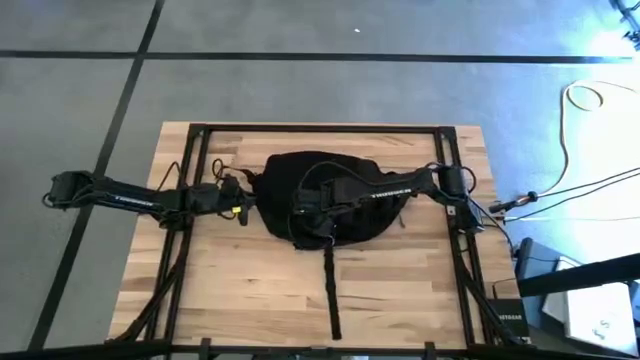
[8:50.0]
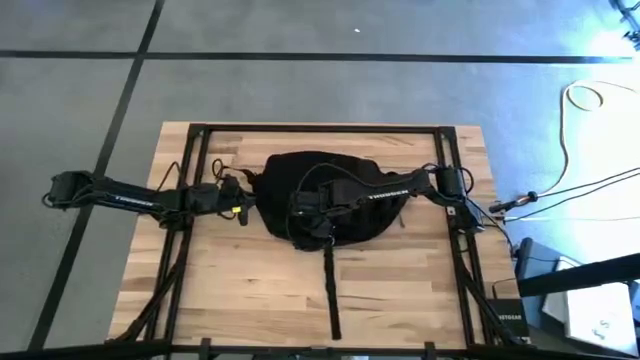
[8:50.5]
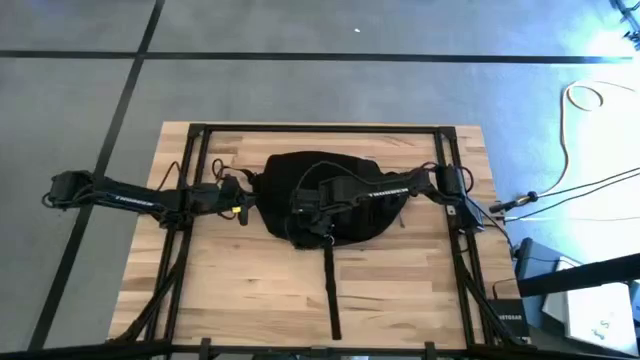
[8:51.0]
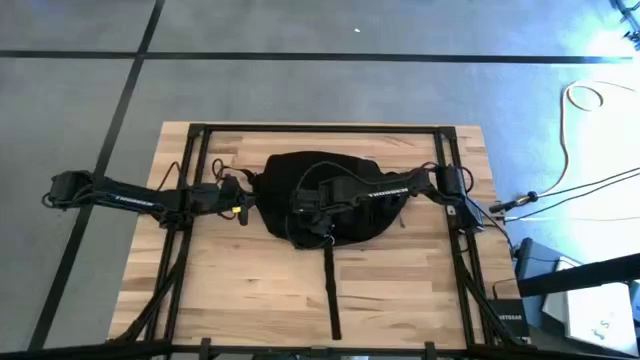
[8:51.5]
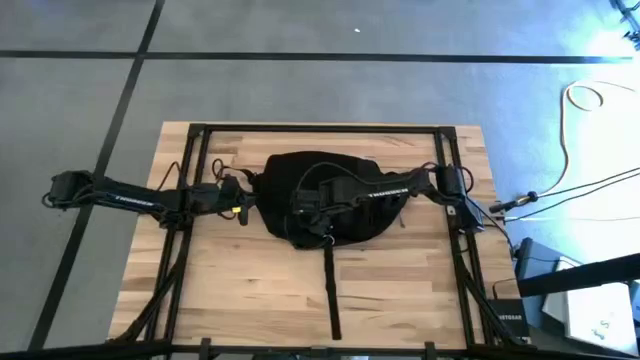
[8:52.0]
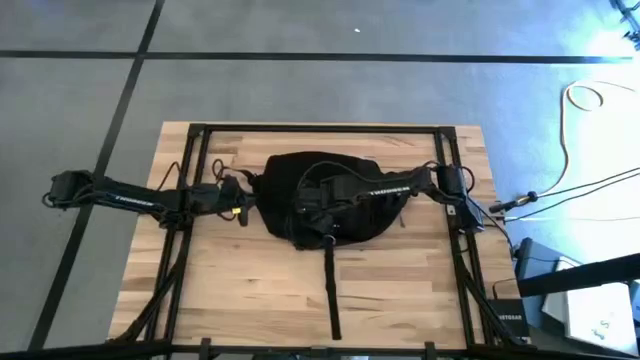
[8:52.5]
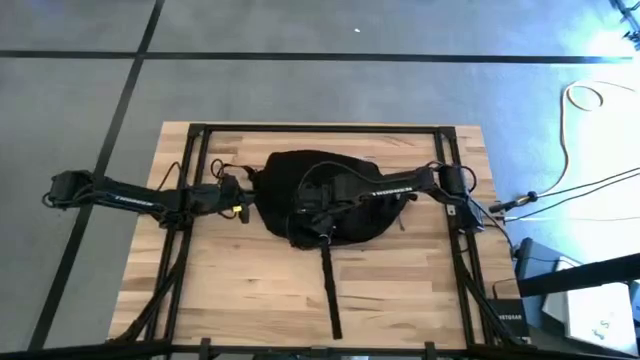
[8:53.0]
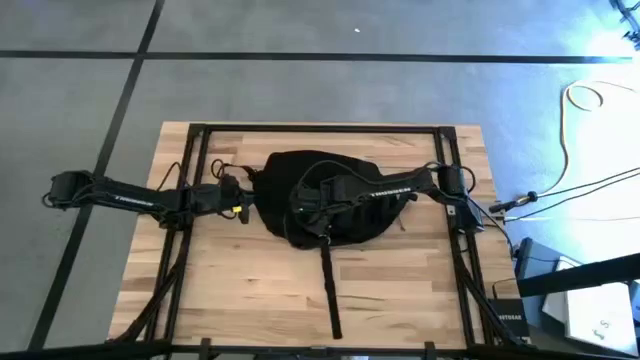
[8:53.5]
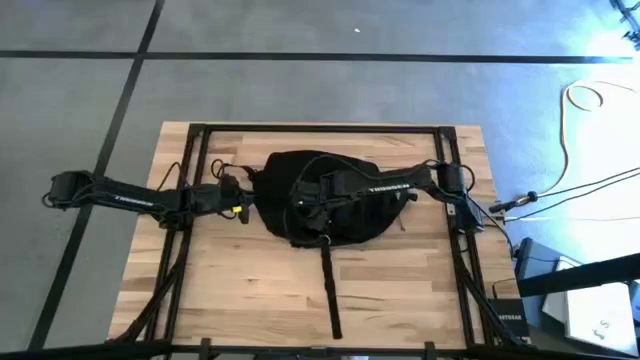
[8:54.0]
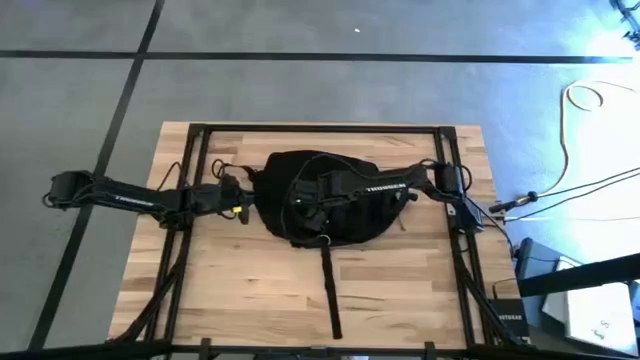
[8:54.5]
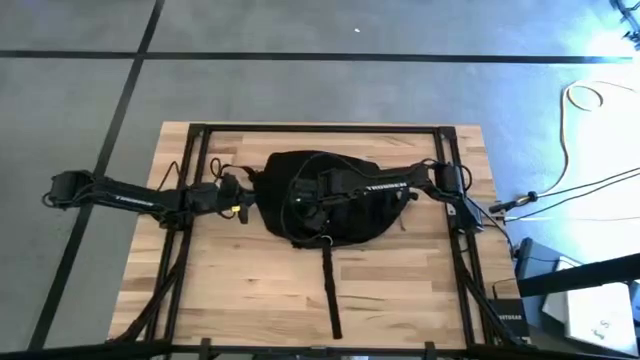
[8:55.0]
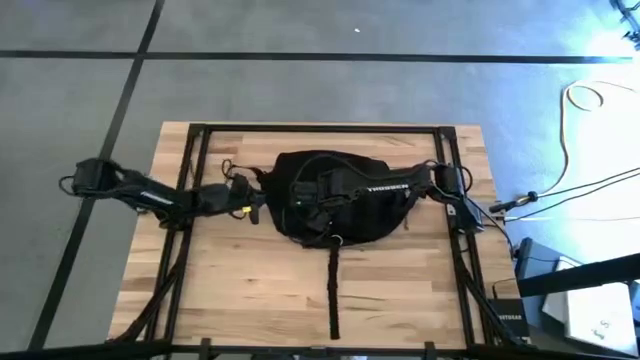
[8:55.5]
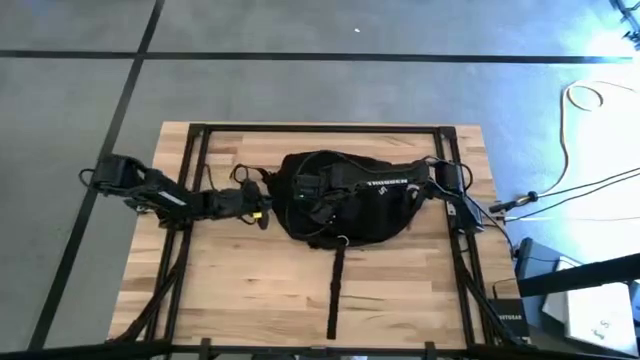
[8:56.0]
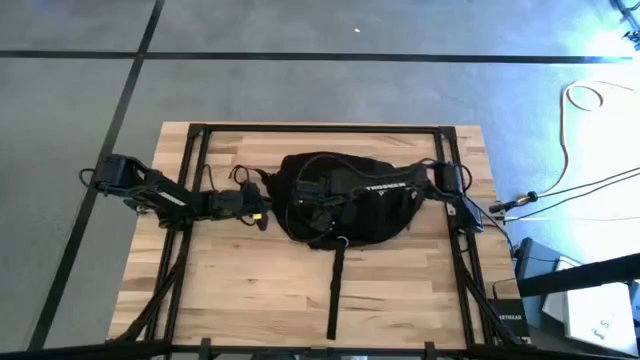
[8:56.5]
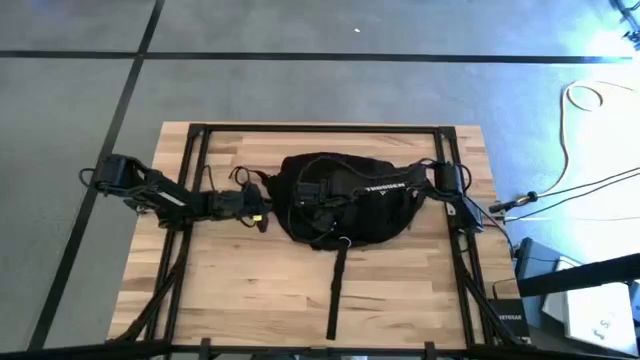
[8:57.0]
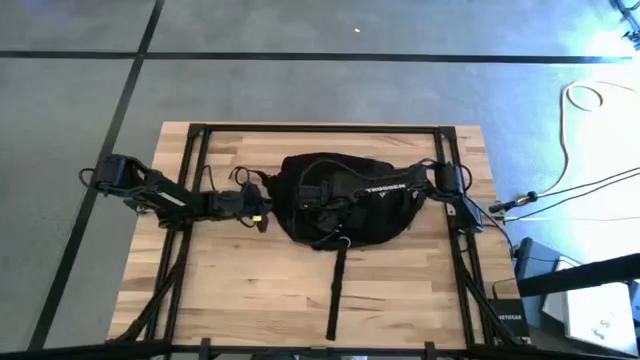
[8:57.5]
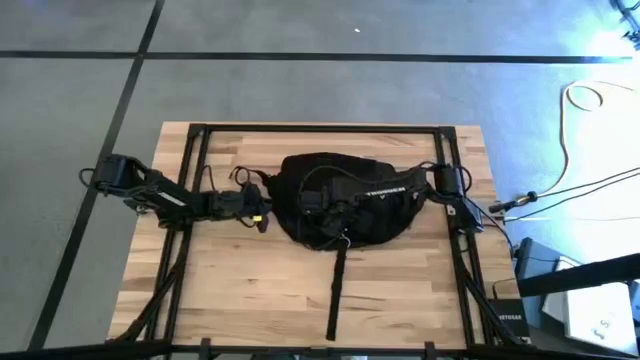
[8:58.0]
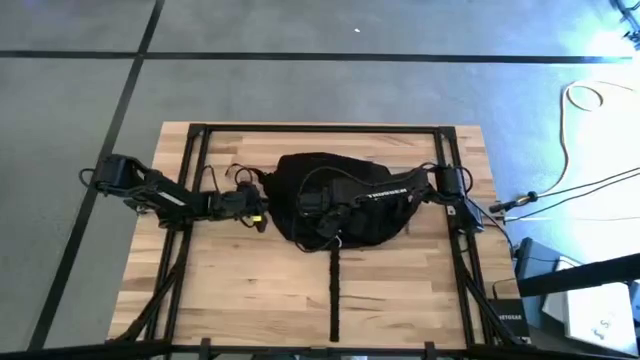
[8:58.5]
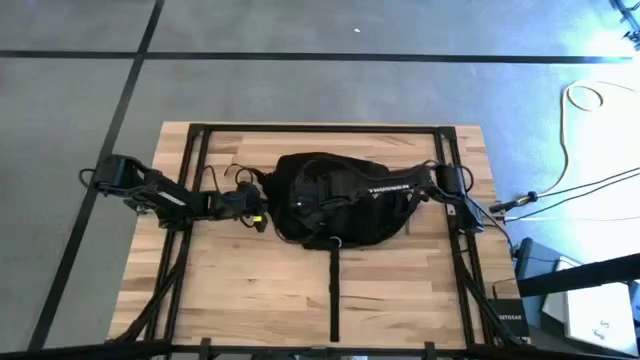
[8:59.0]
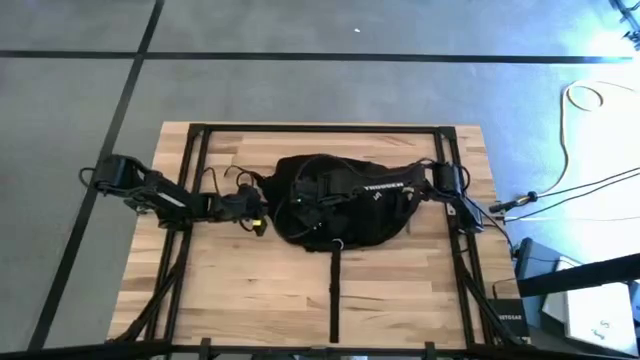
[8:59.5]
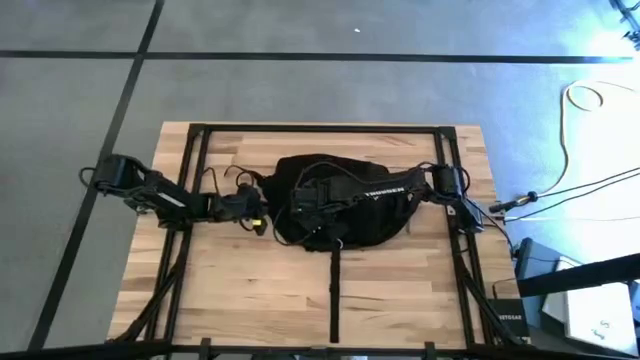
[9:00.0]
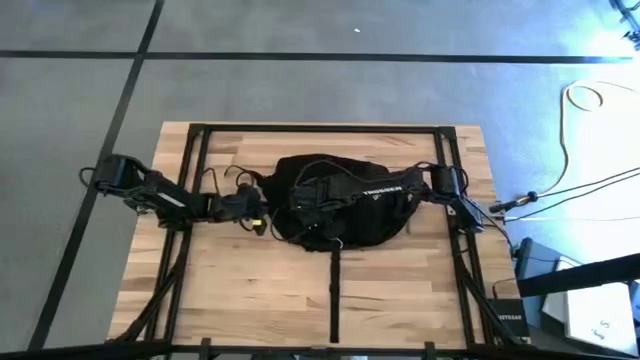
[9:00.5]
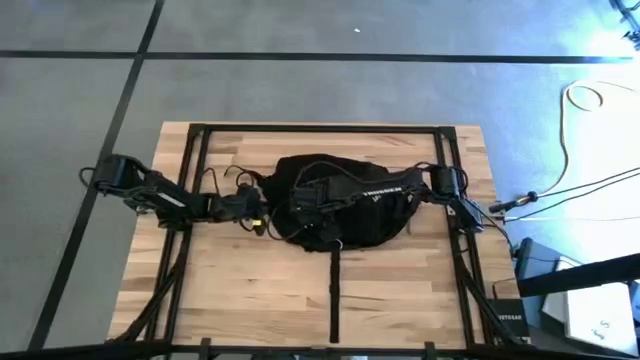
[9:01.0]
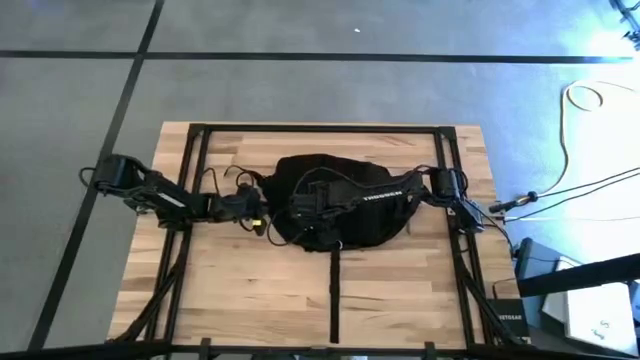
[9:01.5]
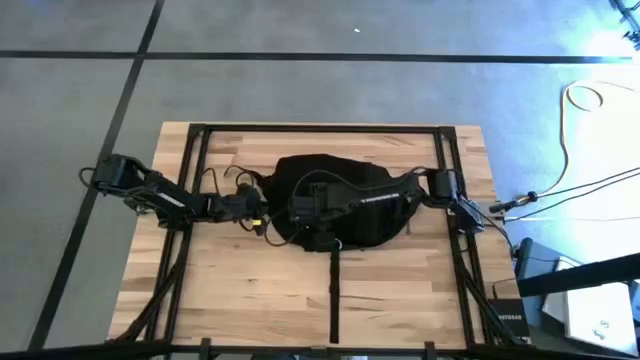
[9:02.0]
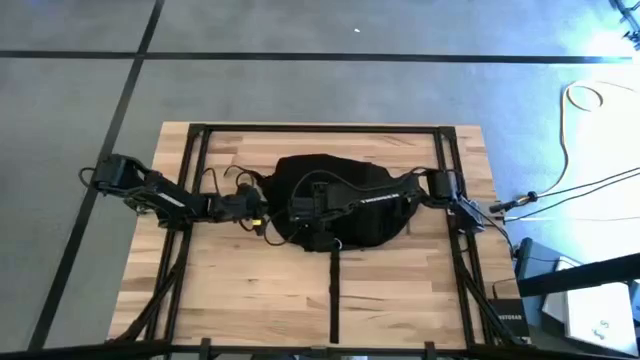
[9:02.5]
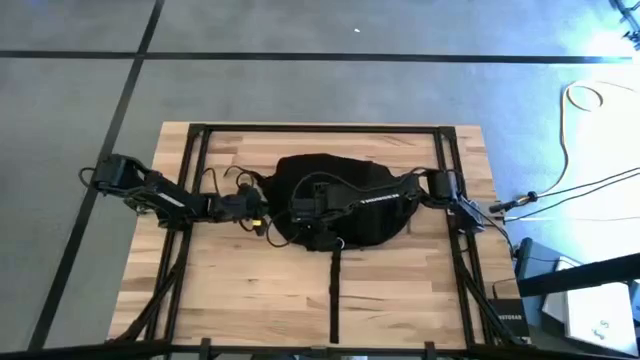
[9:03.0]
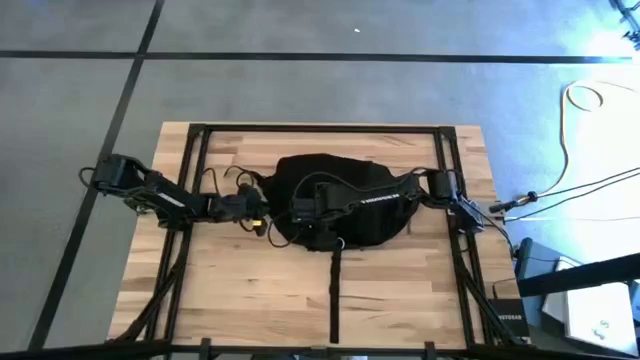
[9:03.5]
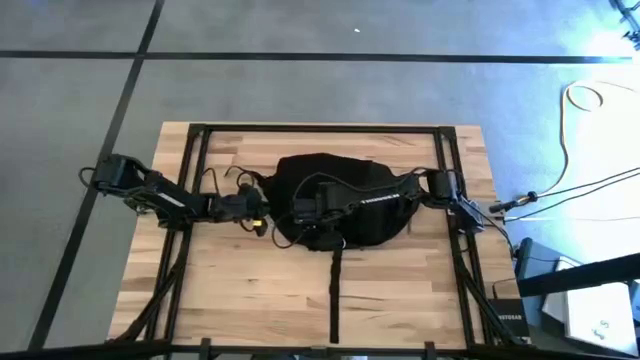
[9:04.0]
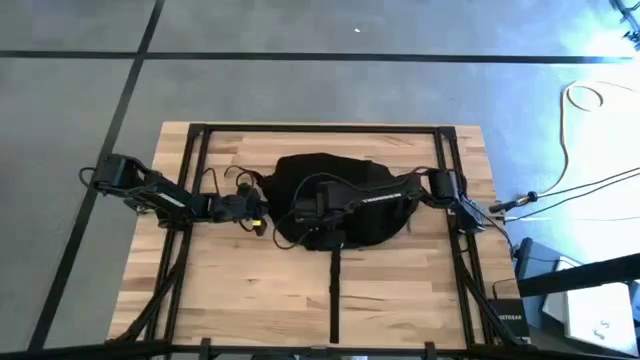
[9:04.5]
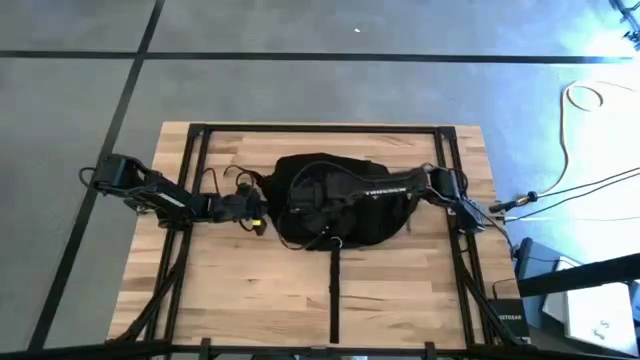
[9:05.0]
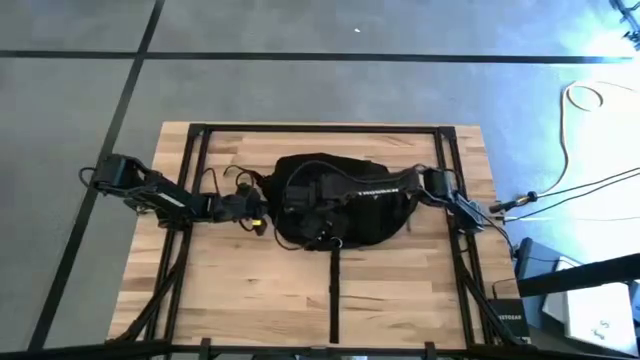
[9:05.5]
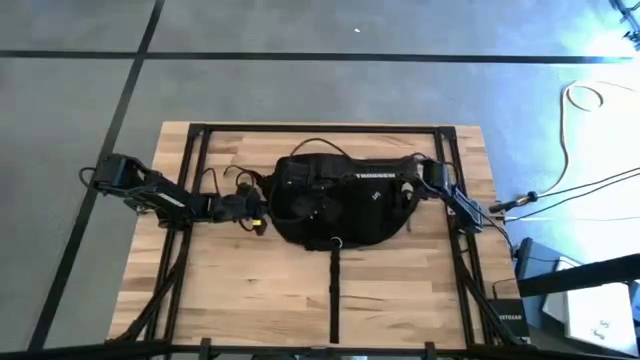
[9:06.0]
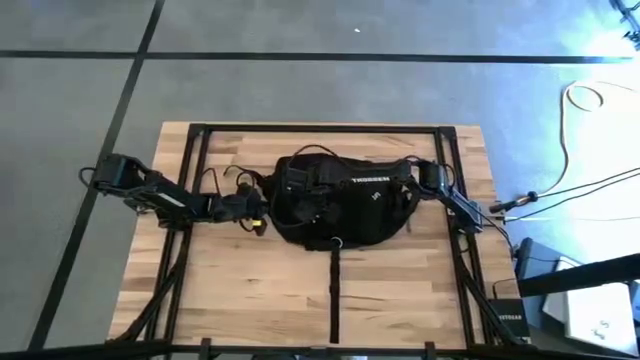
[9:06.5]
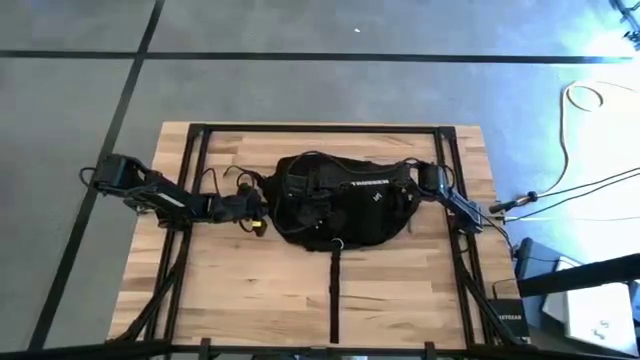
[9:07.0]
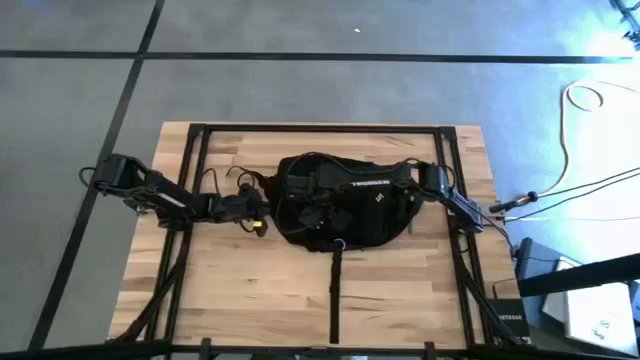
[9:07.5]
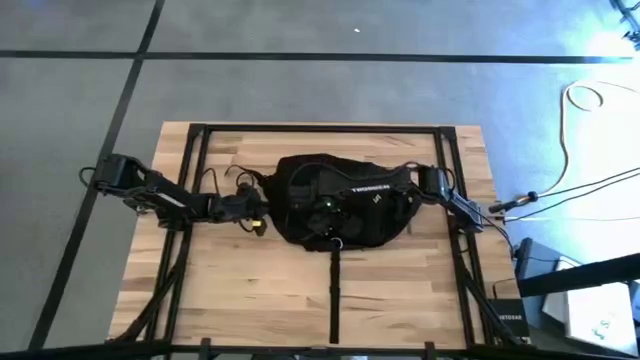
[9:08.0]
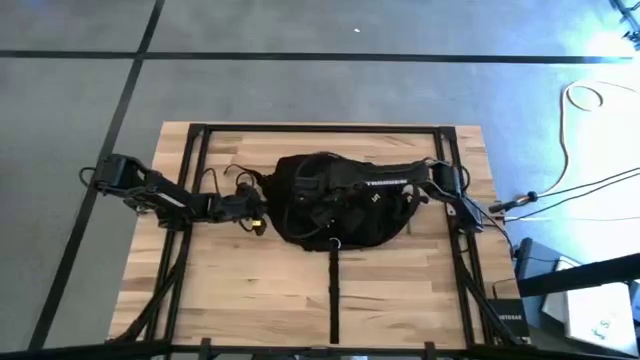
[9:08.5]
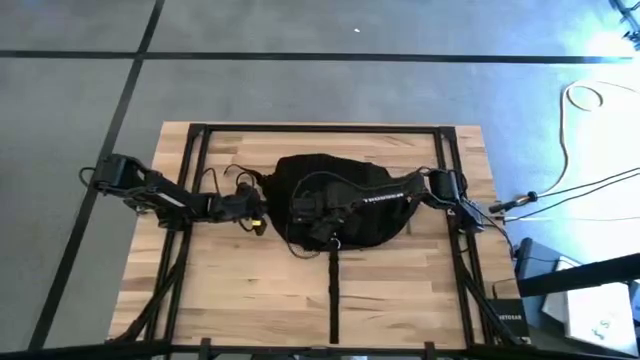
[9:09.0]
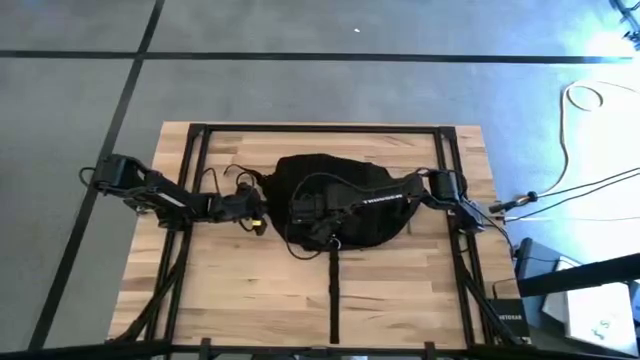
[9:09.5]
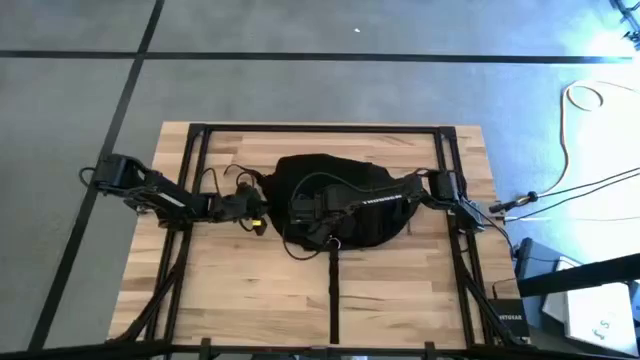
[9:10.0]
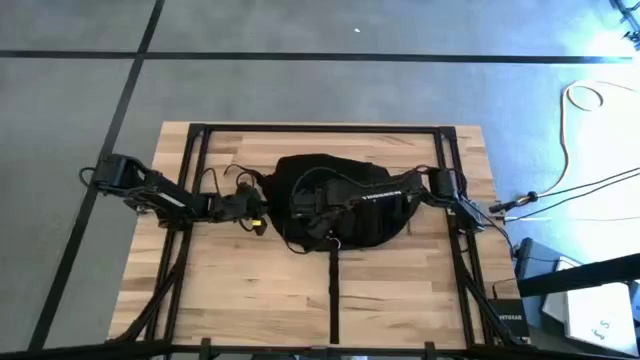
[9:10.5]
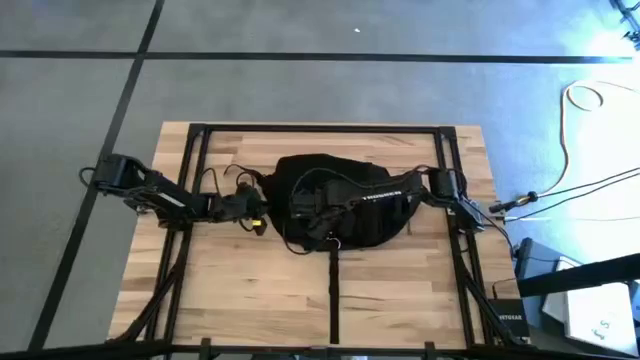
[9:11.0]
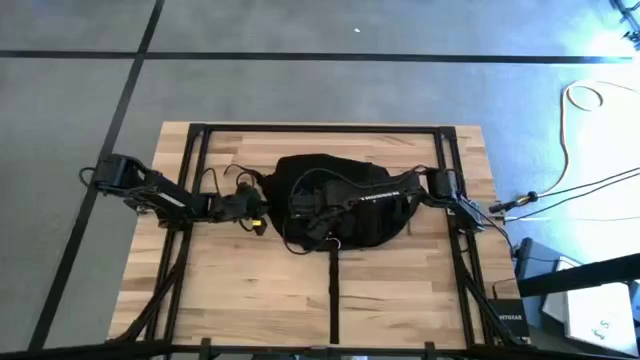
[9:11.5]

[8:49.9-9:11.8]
Task: Unpack backpack
Close the black bag
